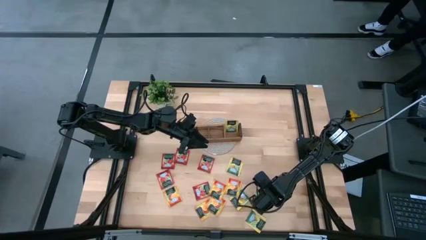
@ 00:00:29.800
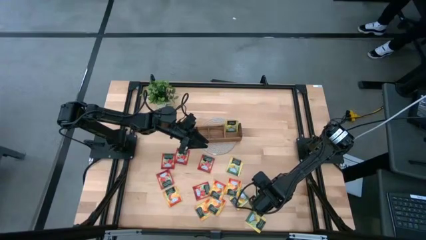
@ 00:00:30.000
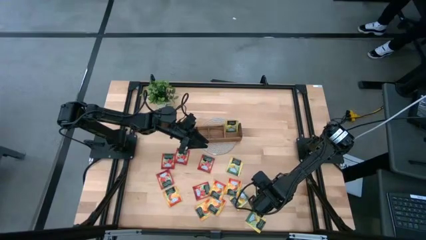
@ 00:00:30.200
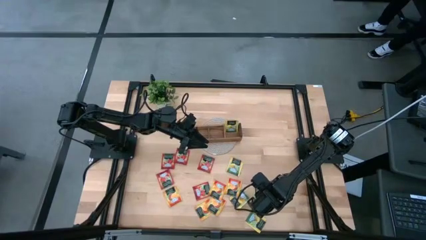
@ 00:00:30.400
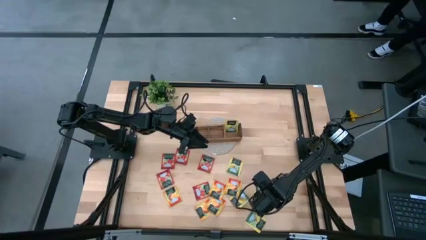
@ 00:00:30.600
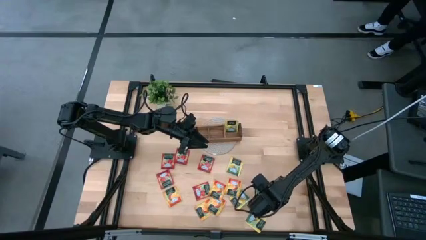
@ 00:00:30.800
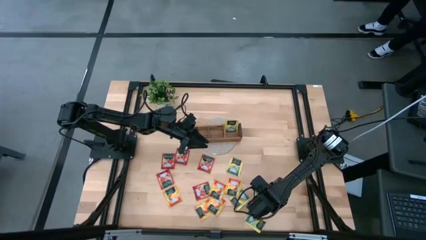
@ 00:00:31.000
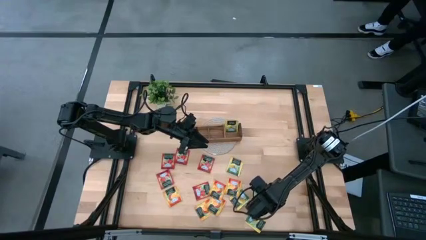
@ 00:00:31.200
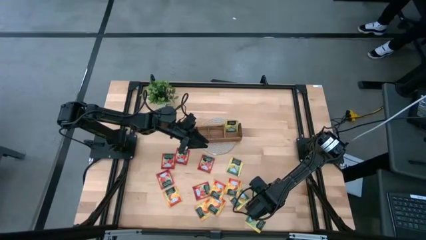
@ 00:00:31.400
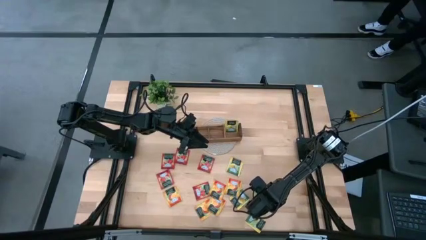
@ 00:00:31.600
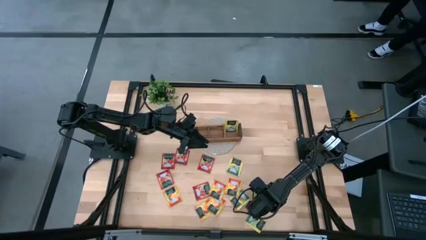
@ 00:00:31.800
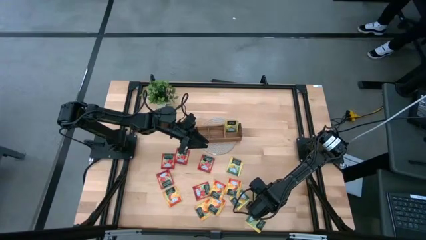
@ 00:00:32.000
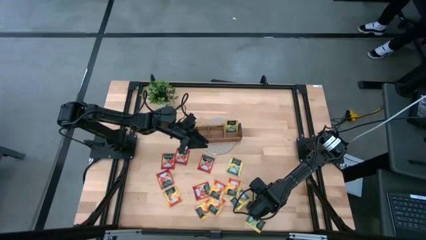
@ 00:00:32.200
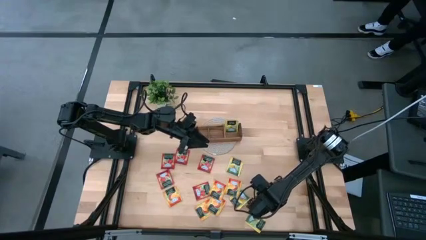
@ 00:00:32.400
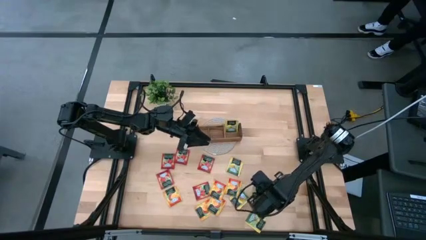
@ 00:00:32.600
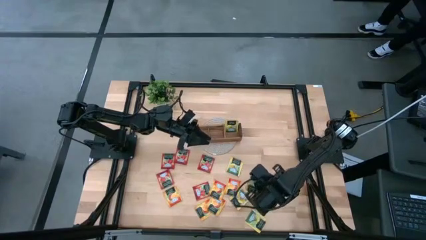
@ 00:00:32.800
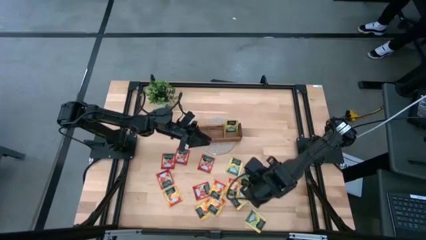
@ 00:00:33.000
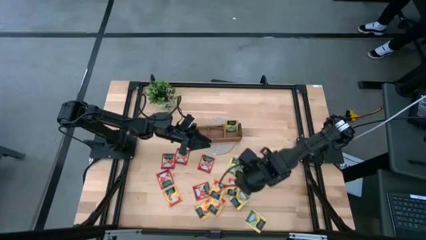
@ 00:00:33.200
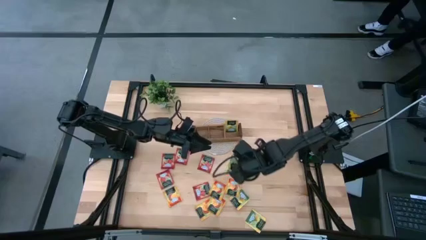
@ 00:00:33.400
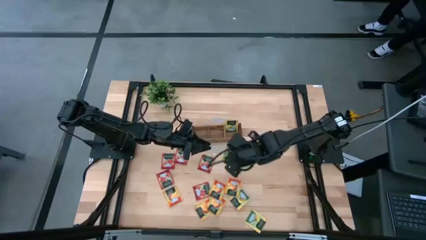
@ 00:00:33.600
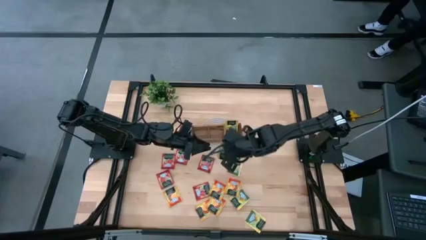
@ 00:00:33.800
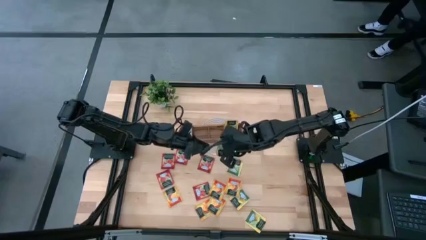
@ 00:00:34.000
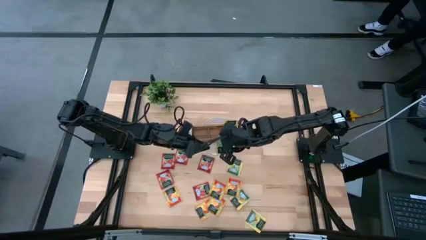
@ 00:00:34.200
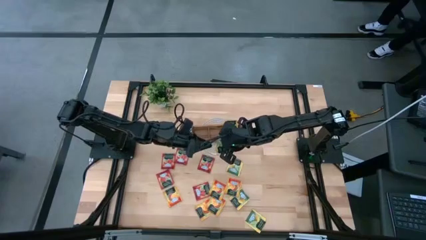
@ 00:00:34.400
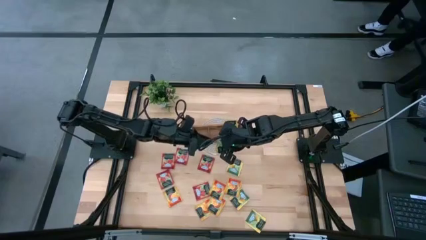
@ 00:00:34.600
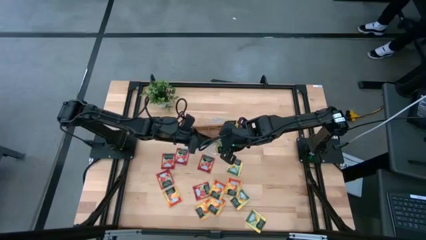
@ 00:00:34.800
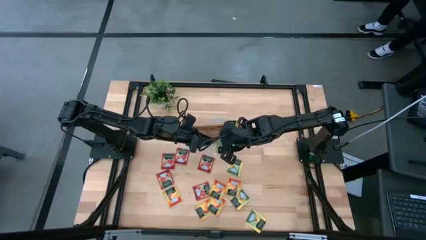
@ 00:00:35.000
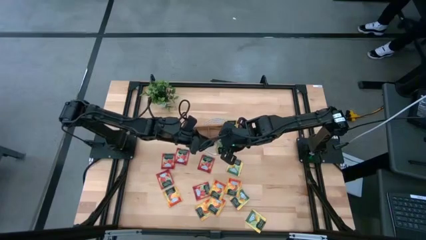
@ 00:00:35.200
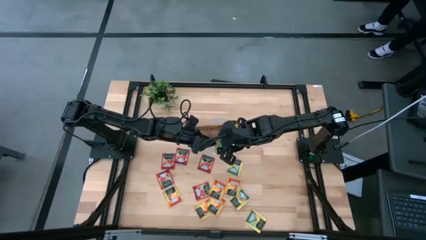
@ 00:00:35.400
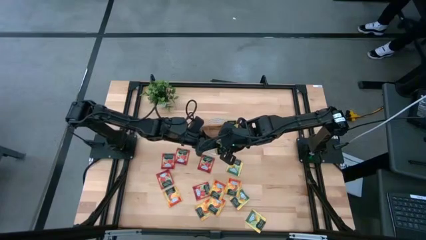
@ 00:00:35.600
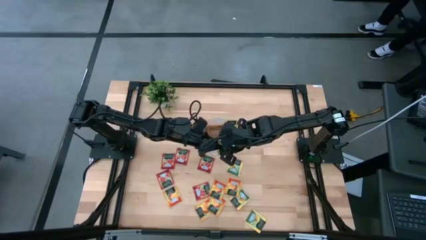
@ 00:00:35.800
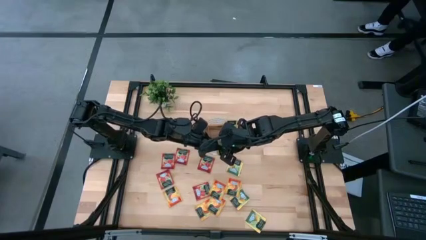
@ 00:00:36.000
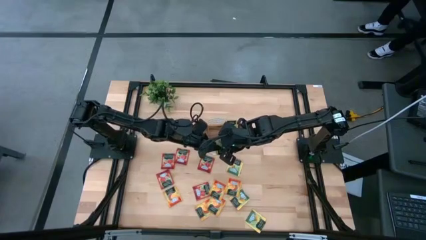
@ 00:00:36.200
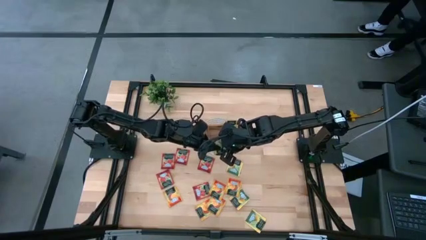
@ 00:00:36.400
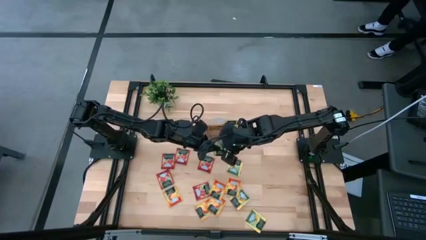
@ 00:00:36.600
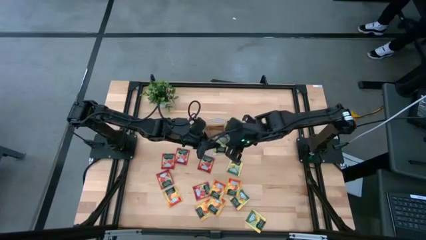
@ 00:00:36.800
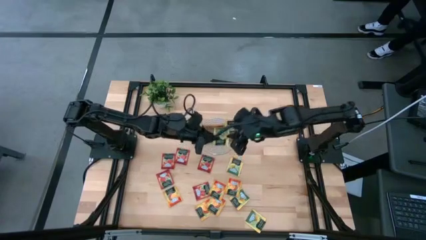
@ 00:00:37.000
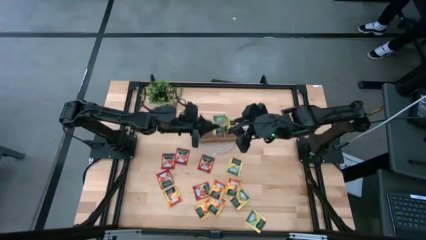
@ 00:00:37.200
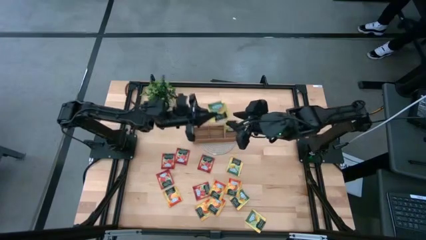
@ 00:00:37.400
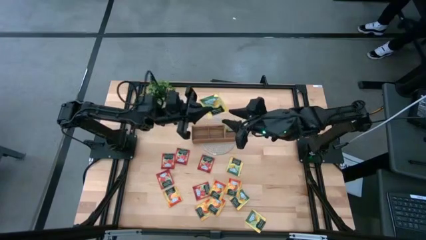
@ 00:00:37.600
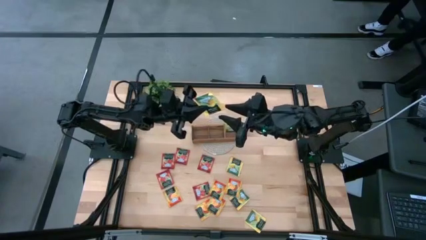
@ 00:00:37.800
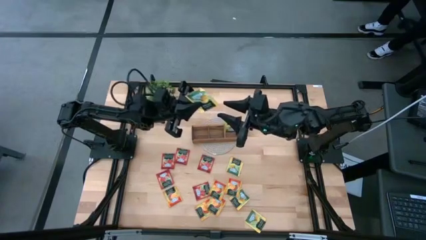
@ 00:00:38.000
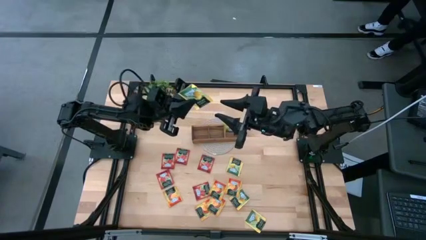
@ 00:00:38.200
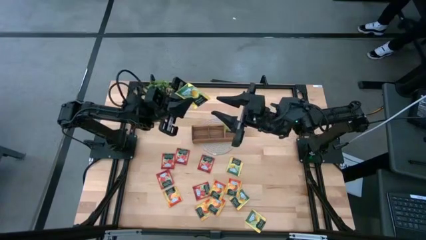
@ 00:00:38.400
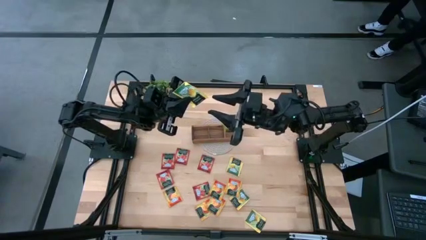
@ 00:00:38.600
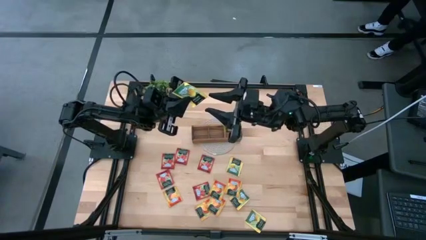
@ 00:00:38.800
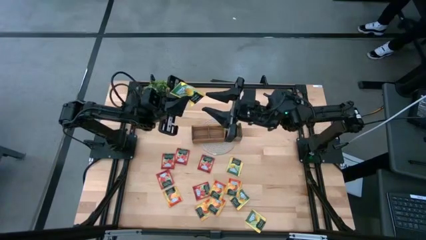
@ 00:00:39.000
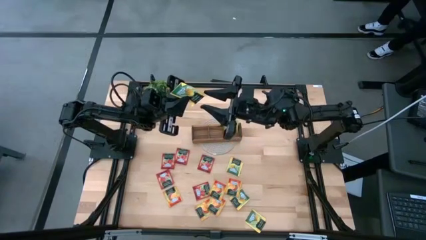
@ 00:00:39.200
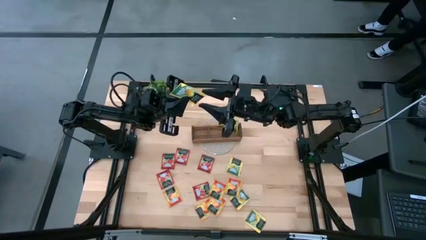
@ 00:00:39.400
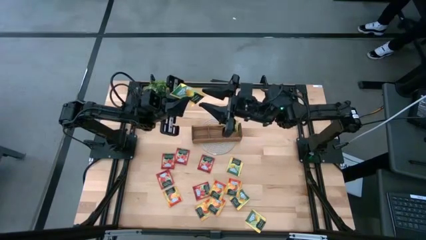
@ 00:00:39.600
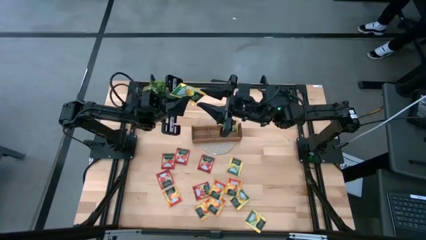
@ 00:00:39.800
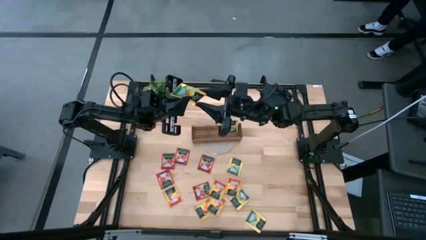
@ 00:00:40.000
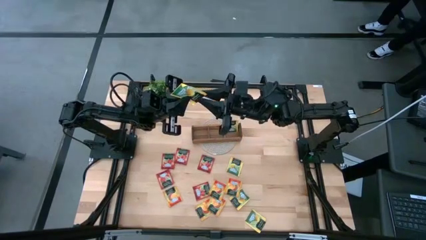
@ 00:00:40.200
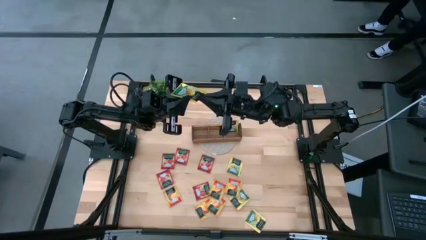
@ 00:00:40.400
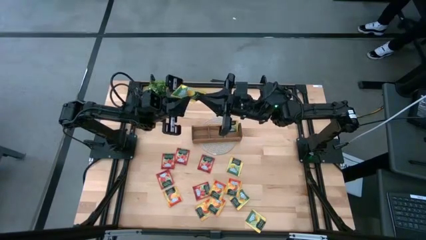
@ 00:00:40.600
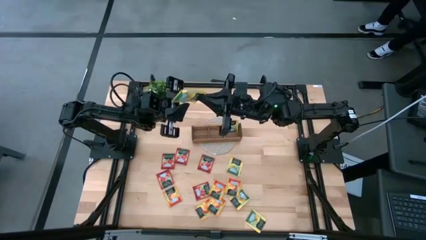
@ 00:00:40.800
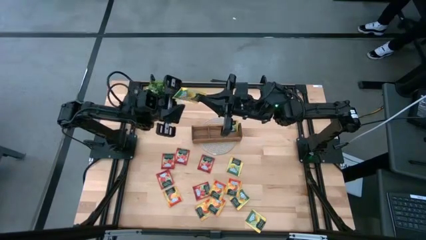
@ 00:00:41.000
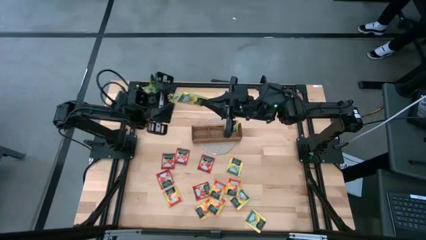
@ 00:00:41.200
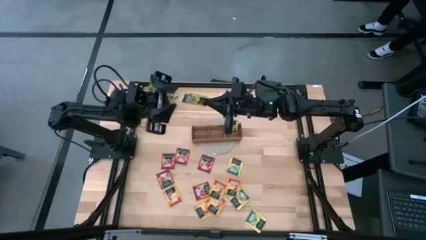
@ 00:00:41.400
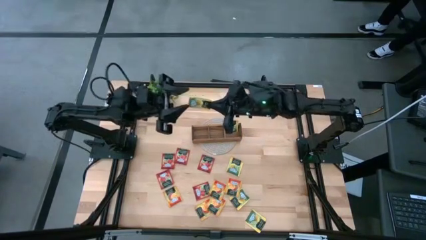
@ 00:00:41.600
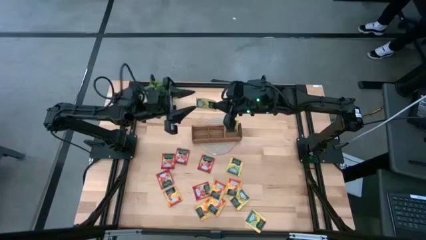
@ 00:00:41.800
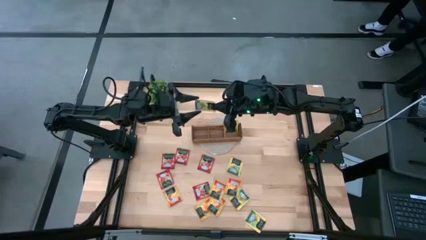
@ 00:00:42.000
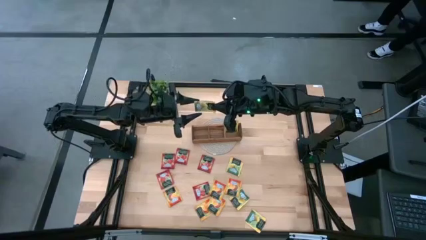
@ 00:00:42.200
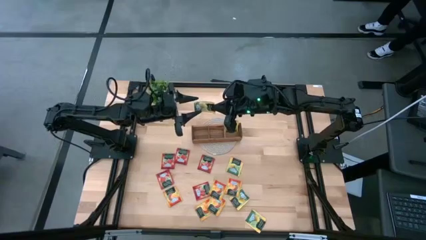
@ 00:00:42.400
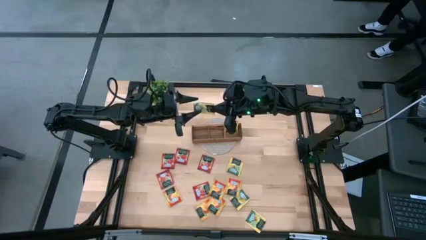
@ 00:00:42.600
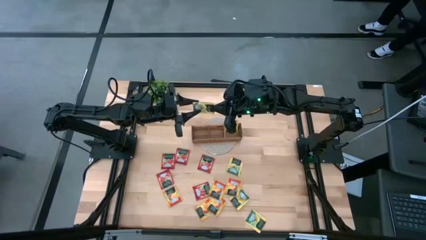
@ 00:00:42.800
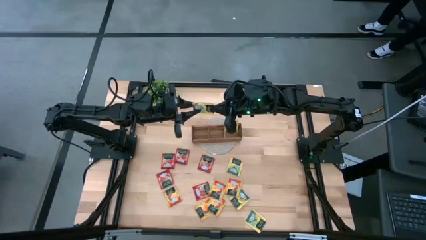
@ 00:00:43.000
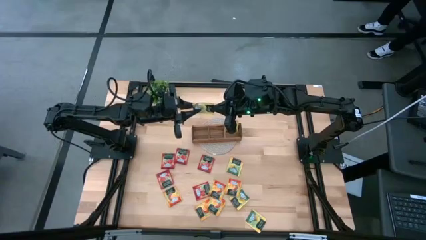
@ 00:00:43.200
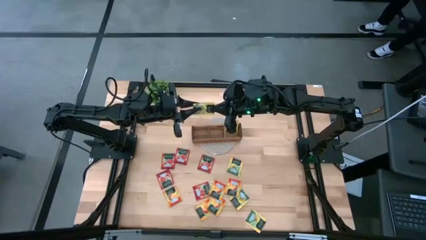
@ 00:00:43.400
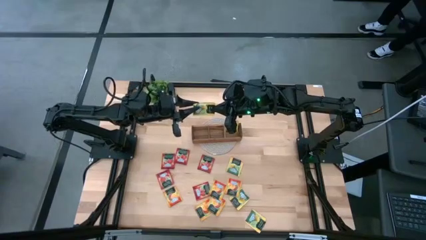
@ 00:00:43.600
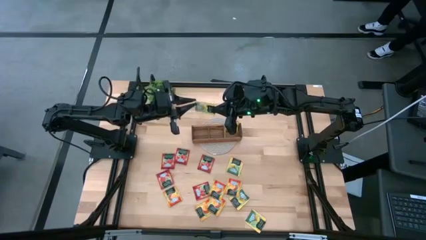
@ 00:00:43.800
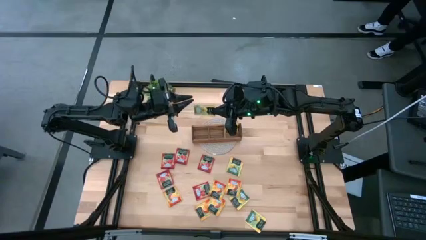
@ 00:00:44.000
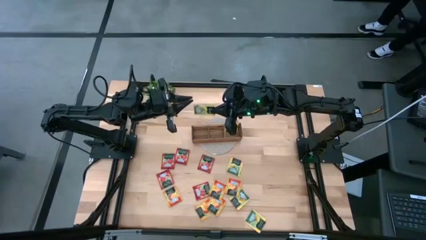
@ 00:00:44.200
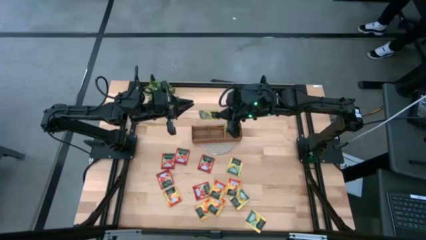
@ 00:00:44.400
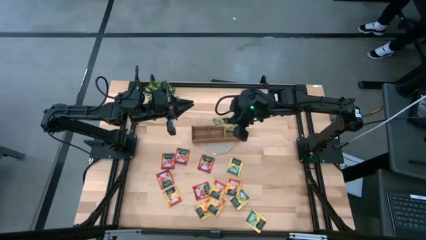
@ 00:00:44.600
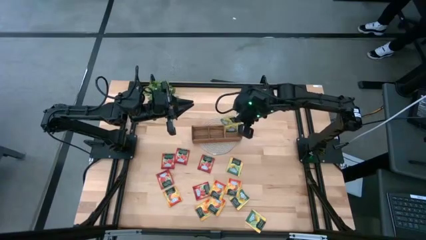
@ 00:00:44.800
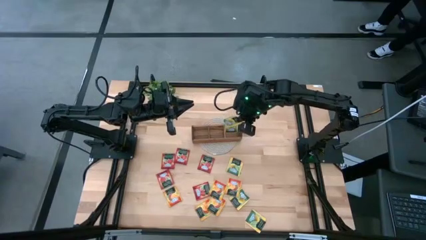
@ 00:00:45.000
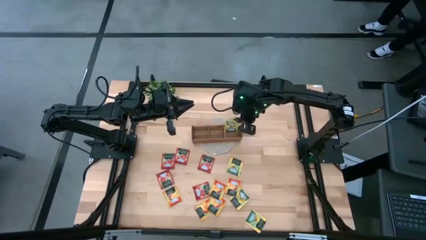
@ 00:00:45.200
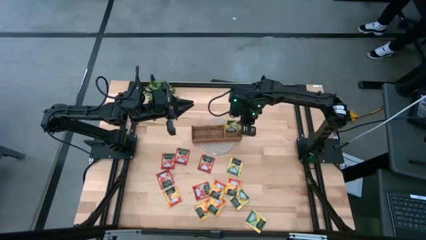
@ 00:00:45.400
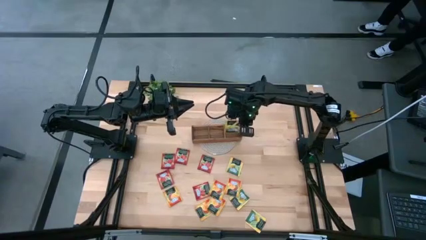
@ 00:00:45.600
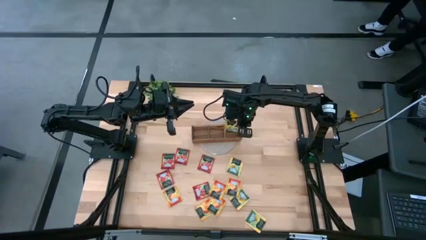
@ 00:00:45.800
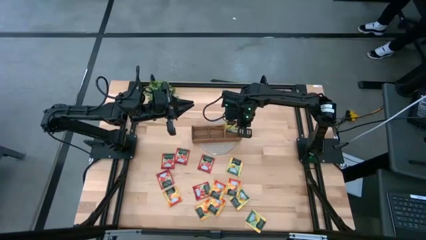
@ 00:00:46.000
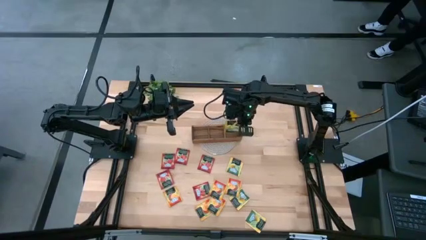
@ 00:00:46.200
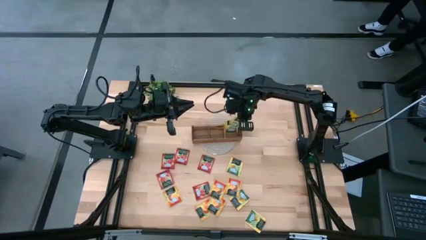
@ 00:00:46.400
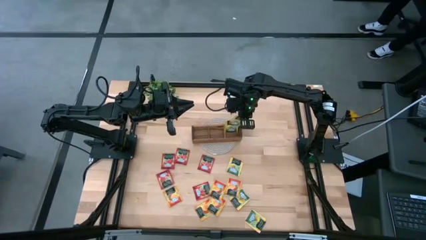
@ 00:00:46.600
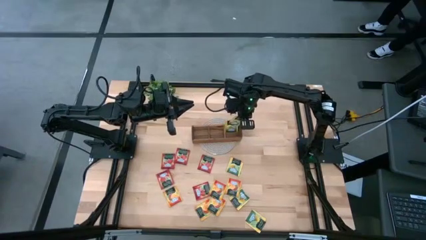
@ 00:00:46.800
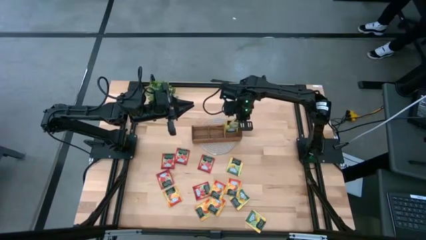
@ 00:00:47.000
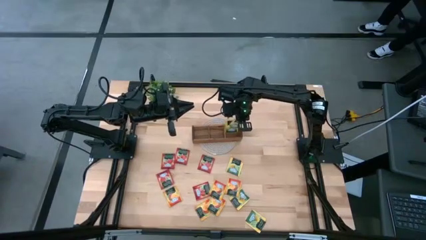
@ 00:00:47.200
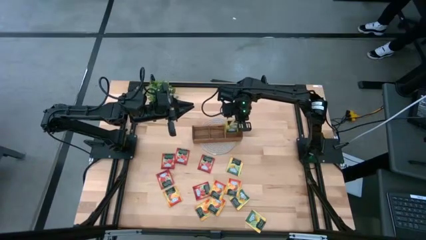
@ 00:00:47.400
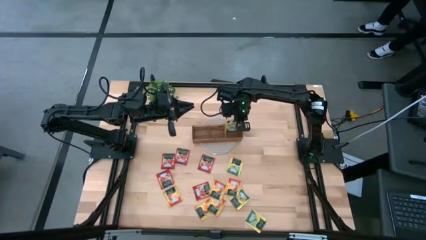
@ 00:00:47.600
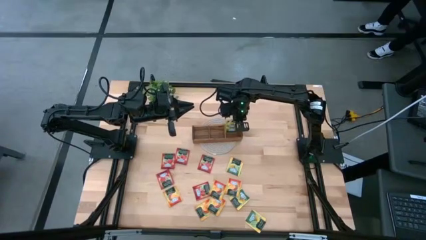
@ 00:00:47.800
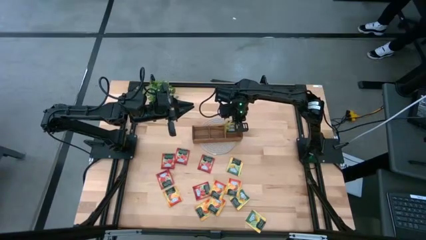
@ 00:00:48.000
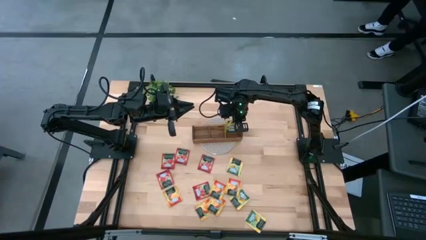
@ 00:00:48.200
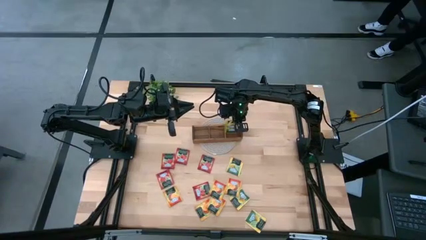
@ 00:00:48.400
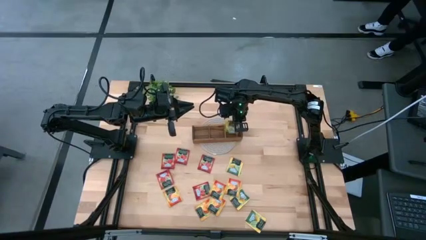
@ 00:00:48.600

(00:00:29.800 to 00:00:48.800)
Task: Pick & Place Tea
Put the yellow tea bag into the right section of the wooden organizer
